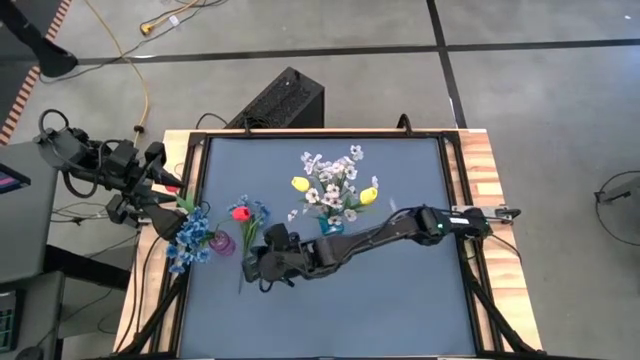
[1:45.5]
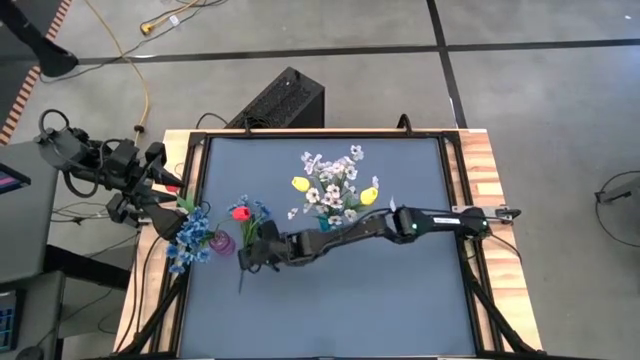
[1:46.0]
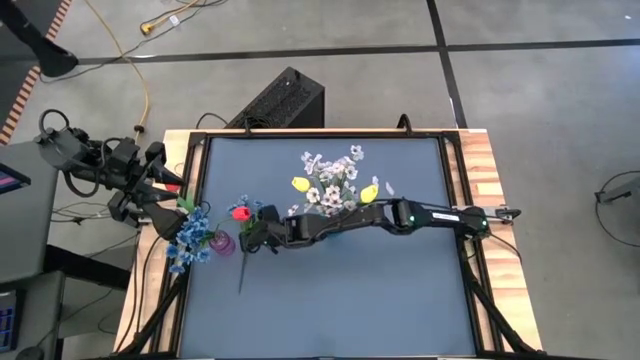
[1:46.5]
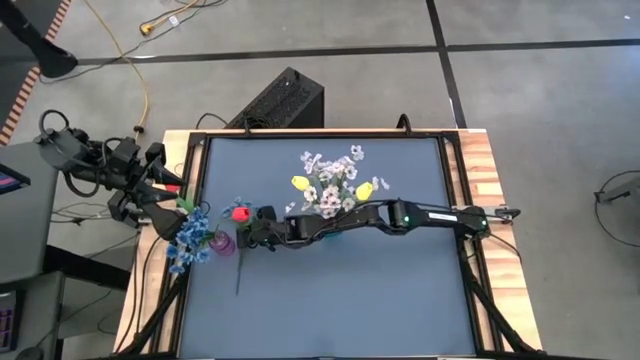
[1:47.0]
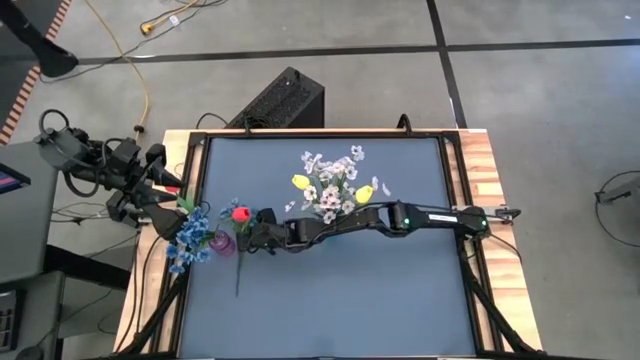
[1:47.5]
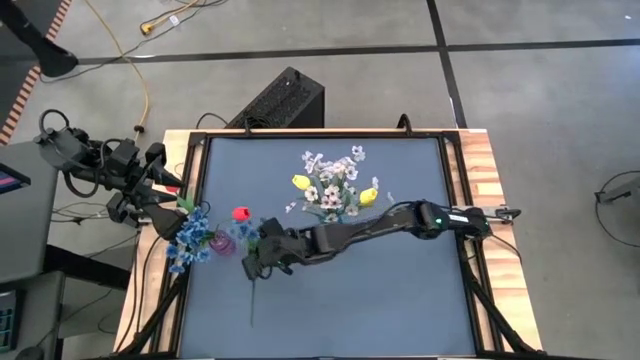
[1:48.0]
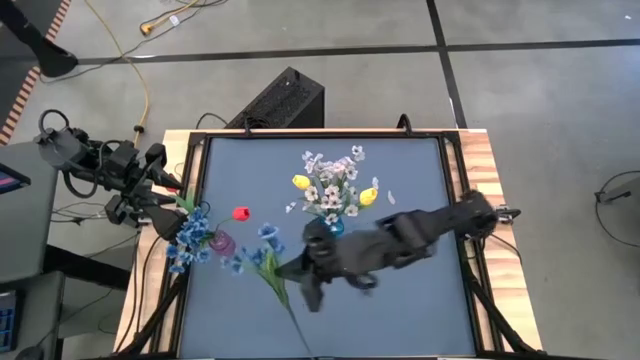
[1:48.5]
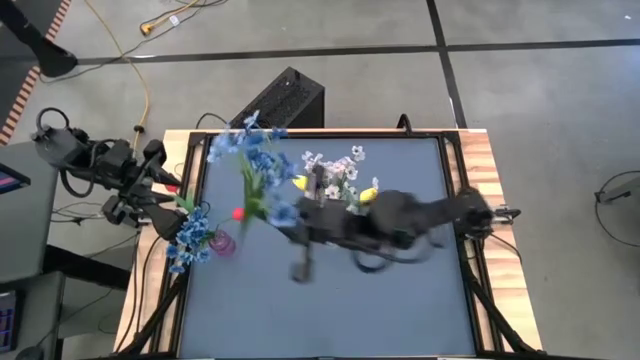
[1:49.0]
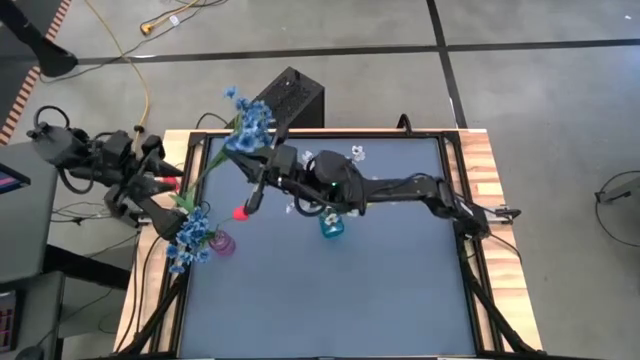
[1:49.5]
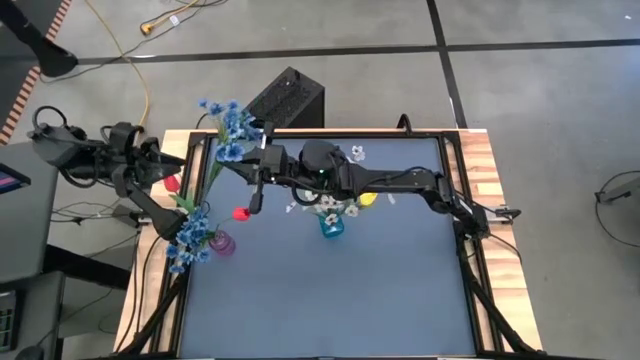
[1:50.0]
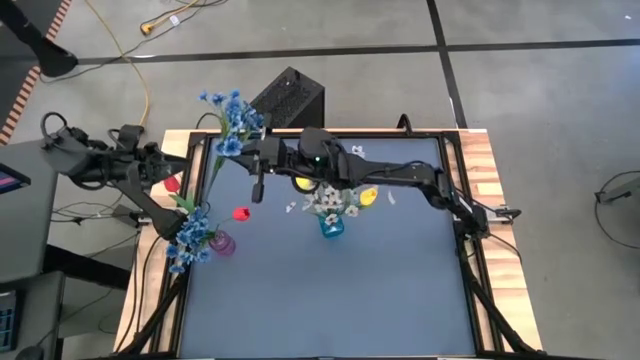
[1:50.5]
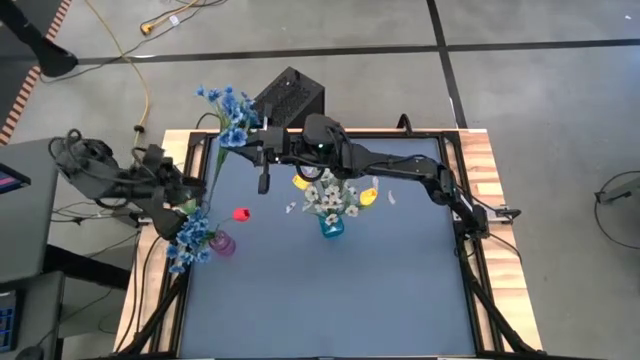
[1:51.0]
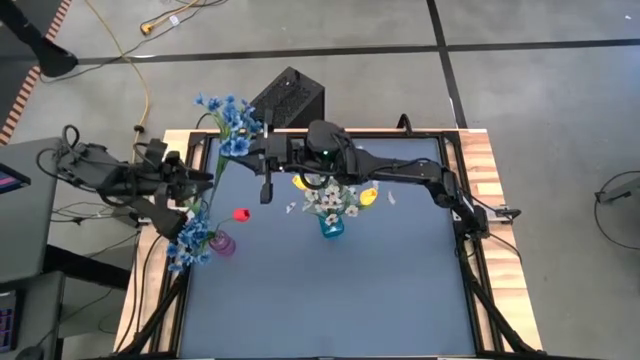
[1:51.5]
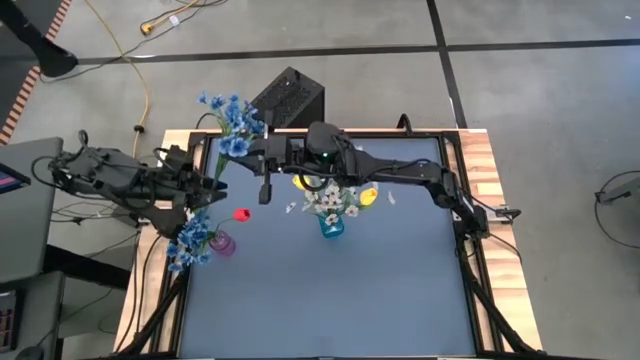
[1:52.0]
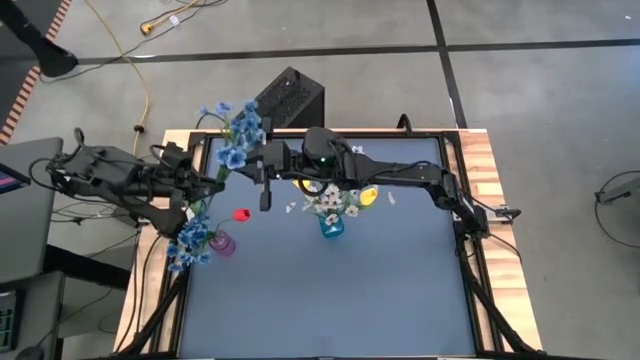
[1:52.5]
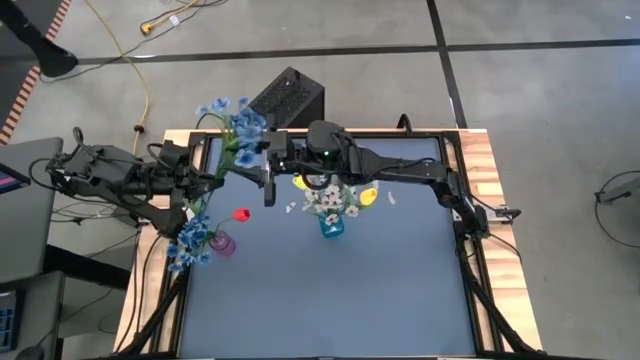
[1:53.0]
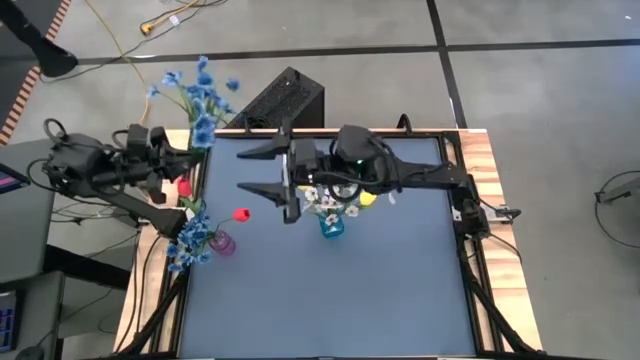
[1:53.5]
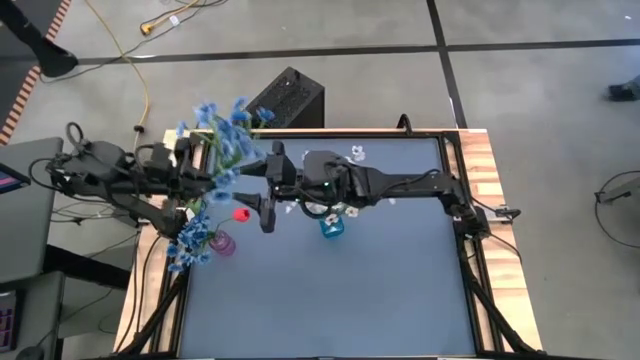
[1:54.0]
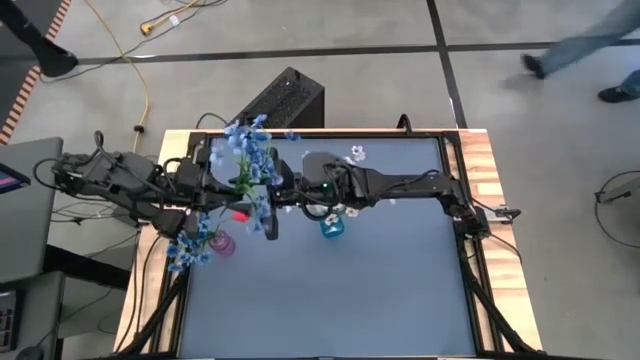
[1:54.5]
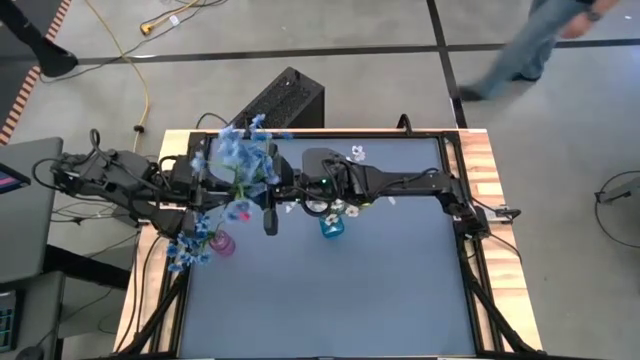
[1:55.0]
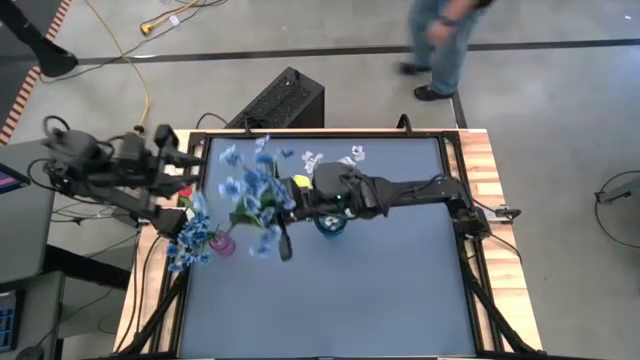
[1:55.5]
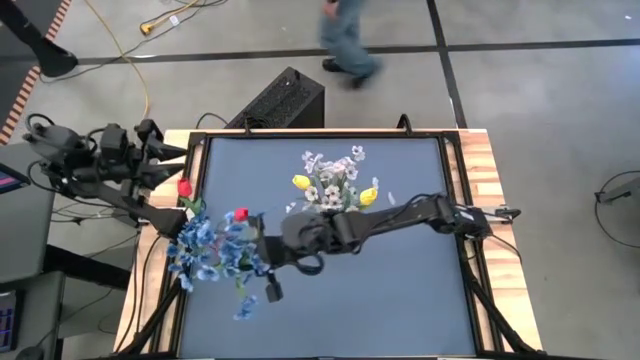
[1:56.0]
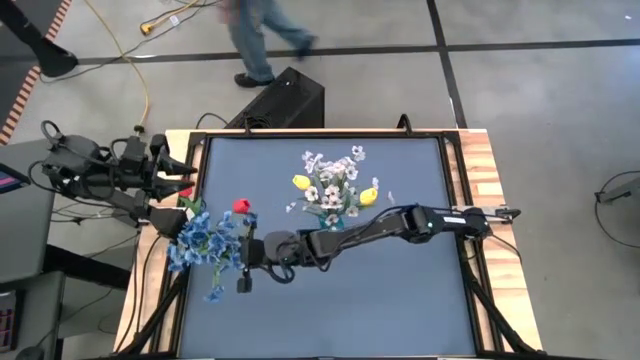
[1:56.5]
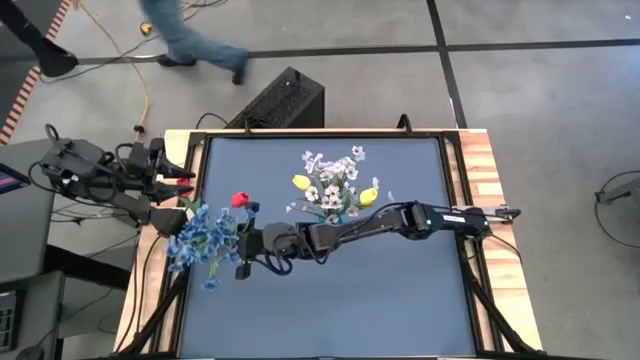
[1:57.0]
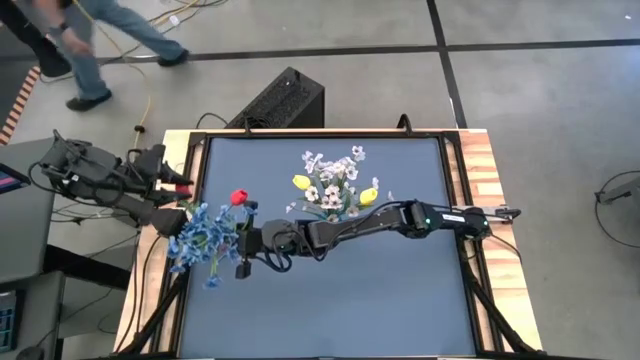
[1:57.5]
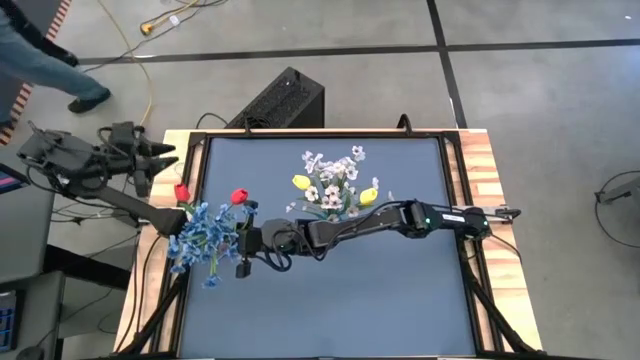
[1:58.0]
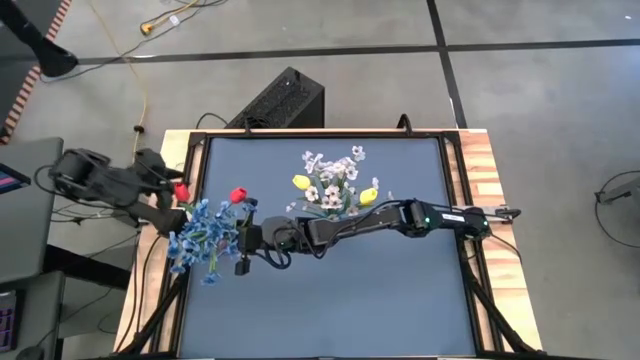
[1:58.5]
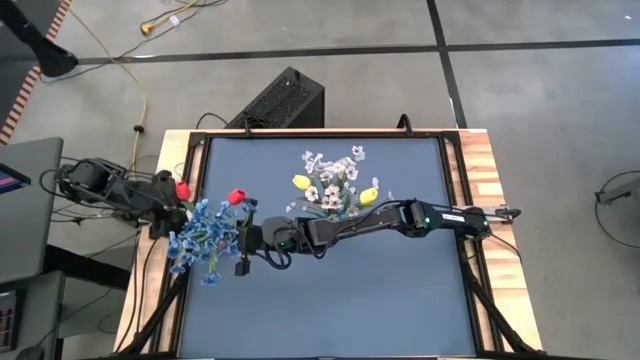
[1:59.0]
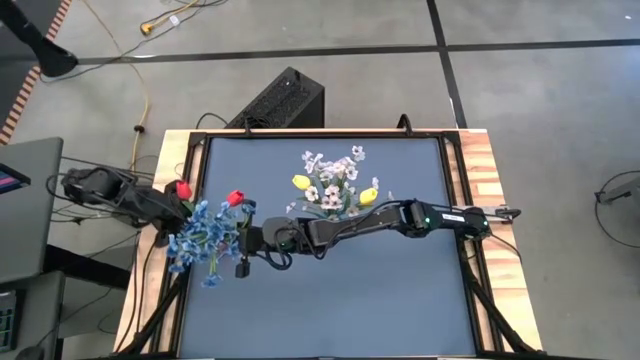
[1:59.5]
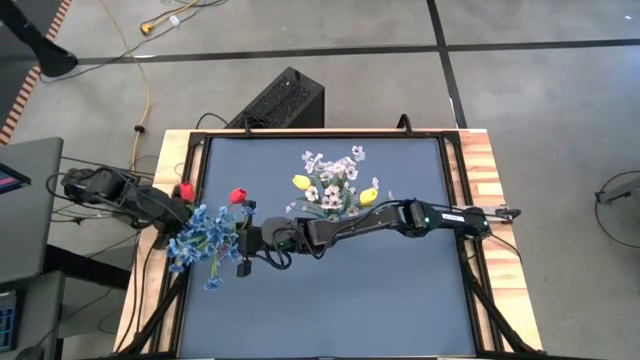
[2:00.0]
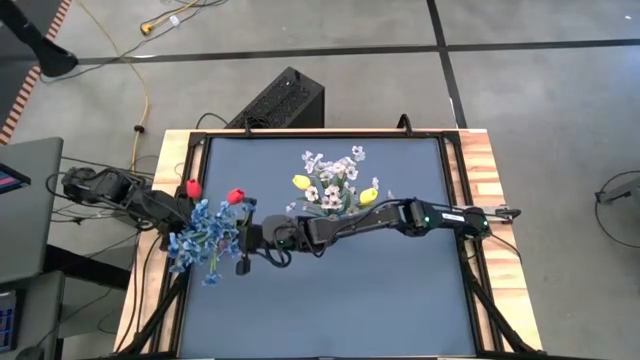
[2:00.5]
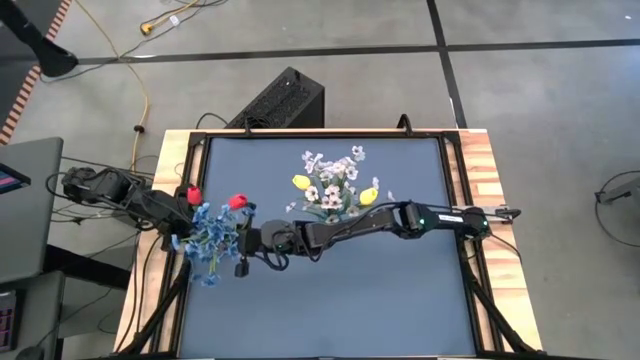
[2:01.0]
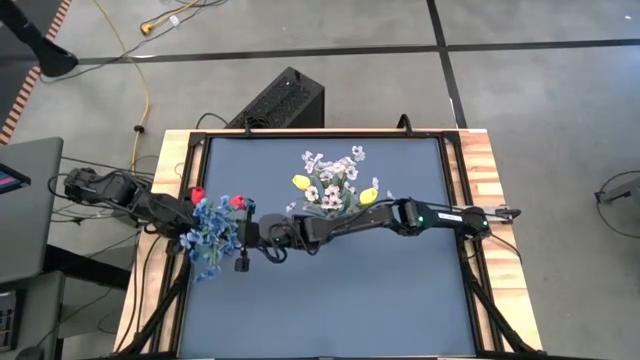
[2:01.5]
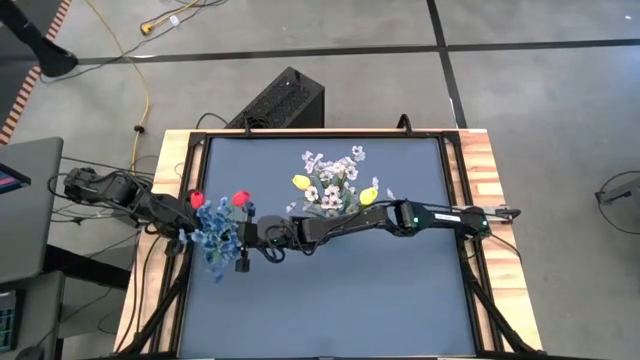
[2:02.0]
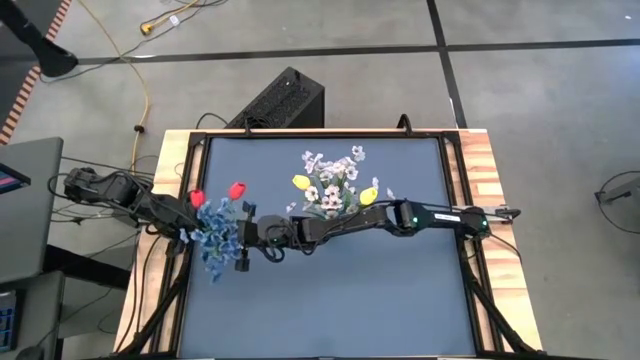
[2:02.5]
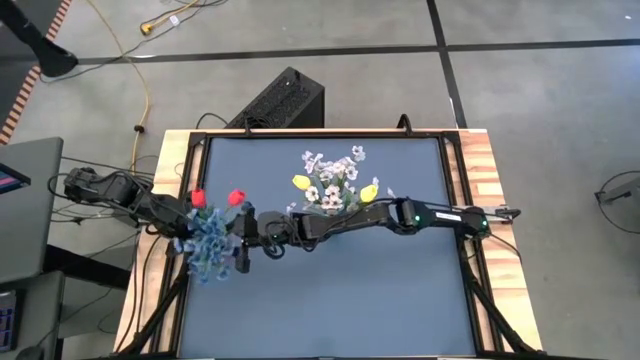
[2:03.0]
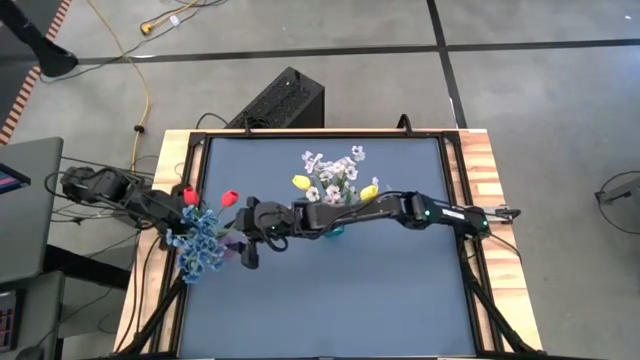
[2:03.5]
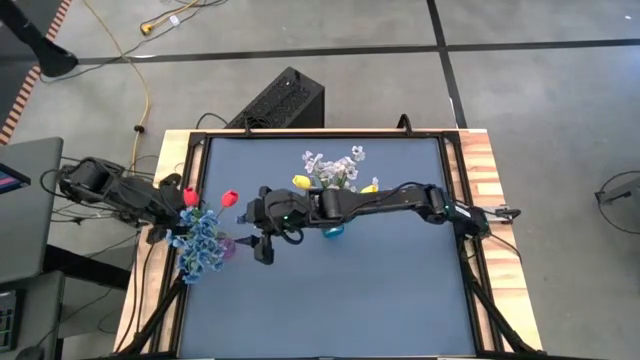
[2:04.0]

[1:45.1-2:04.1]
Task: Sort flowers into vase by color
Put the blue flowers into the purple vase

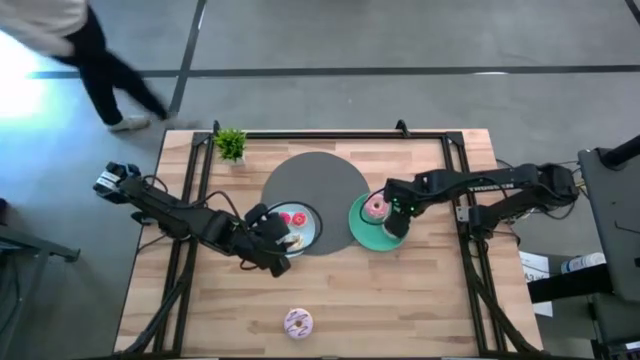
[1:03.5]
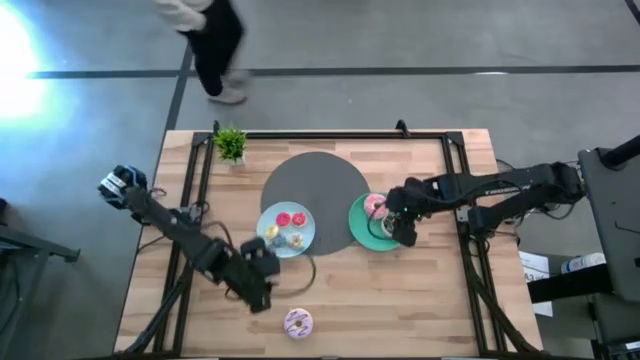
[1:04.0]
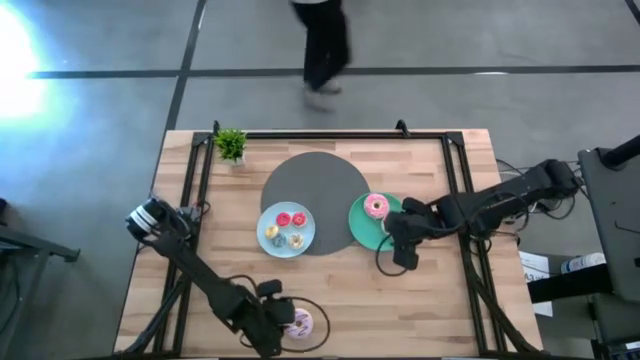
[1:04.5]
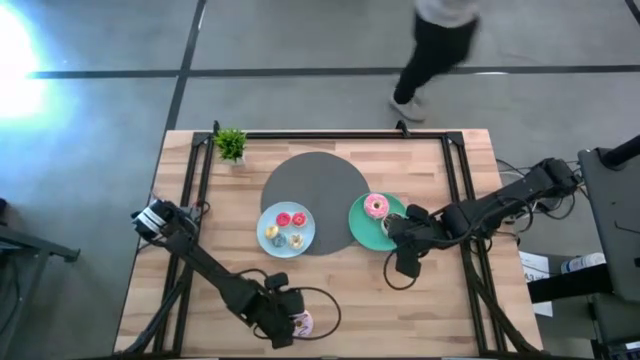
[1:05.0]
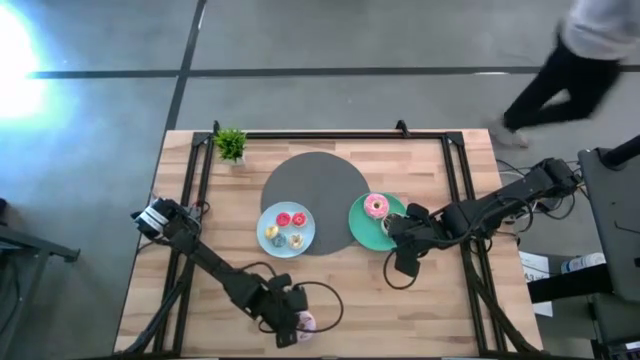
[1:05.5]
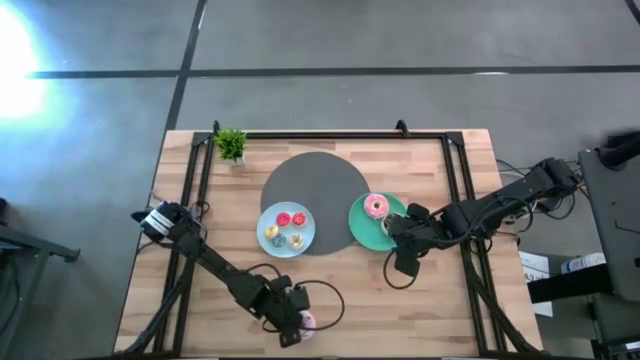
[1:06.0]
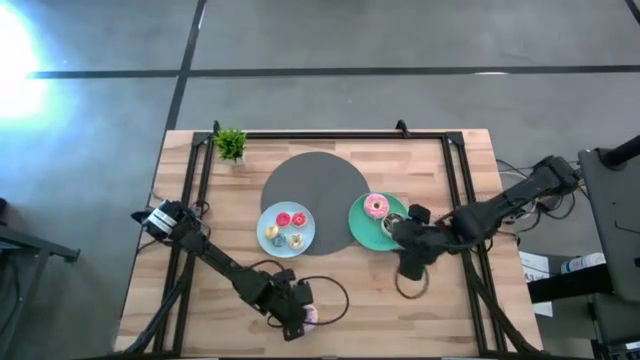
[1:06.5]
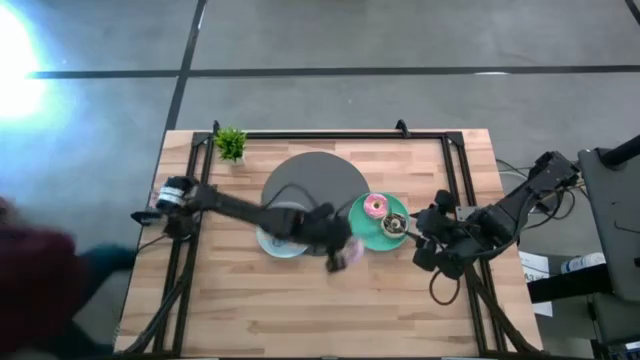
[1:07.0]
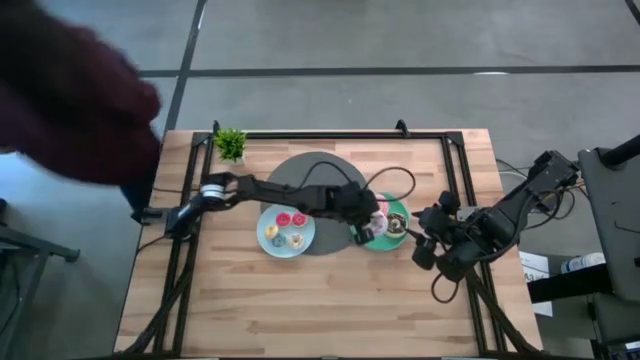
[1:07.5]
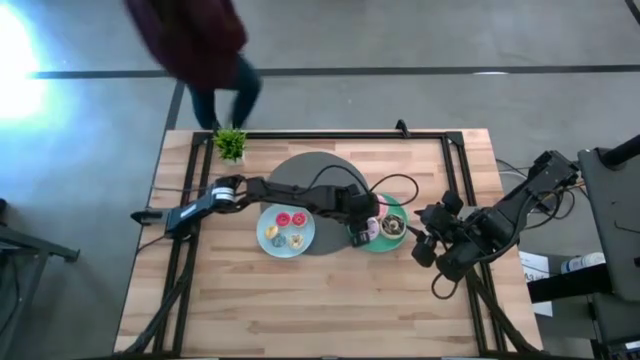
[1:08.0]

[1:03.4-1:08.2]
Task: Pick & Place donuts
Put the big purple donut on the green plate
